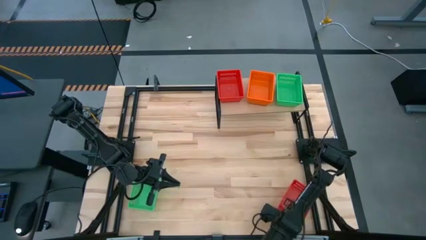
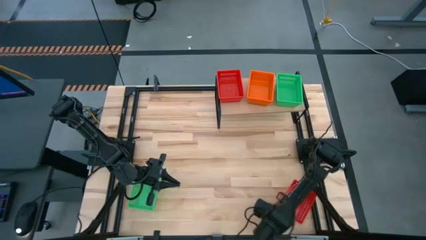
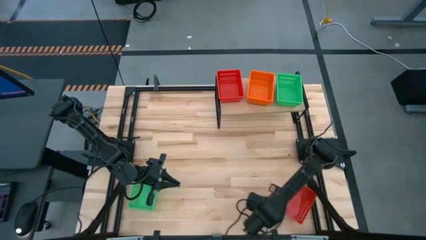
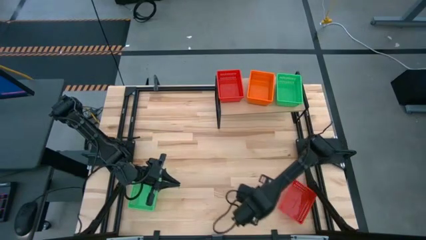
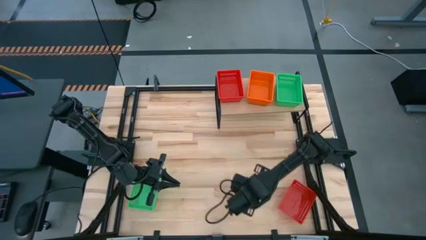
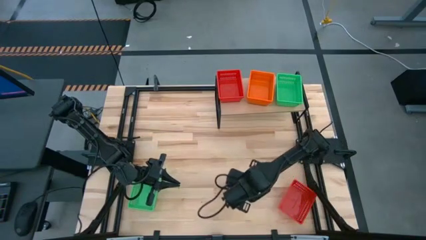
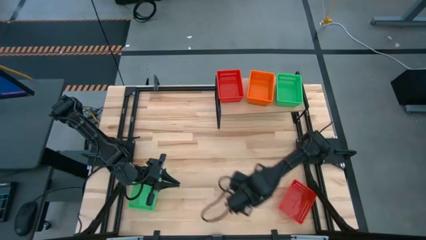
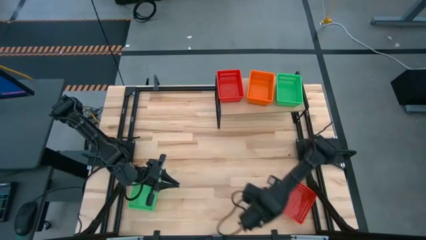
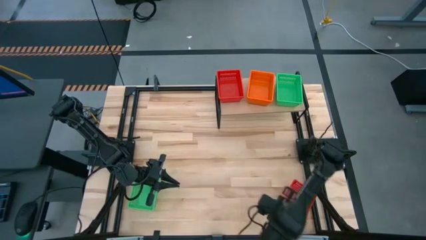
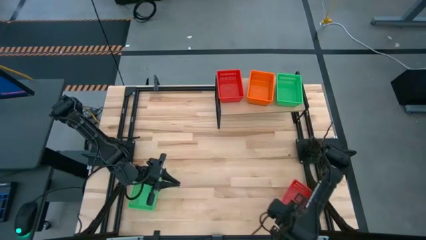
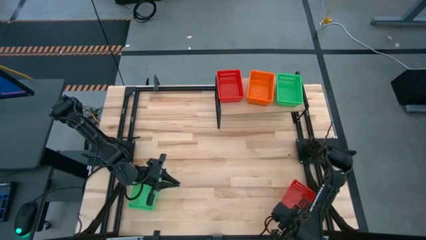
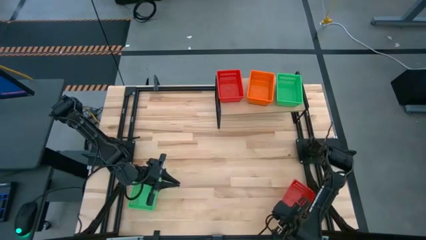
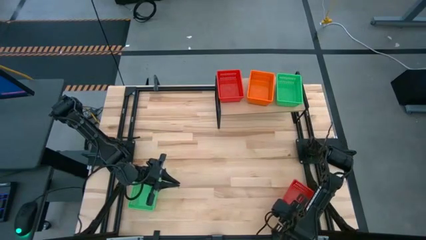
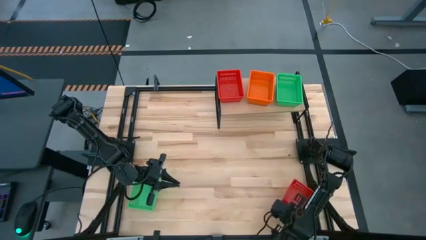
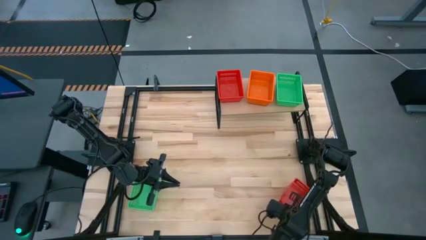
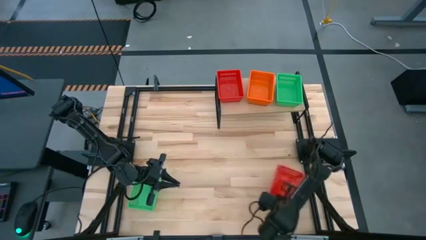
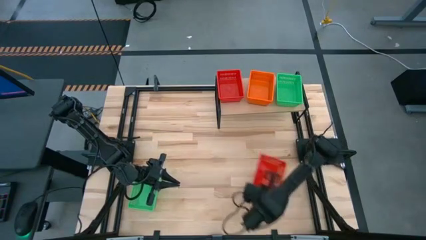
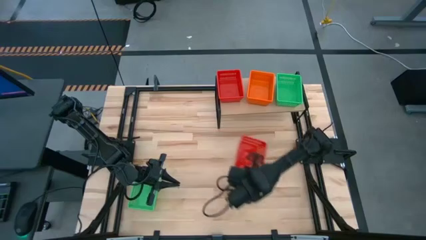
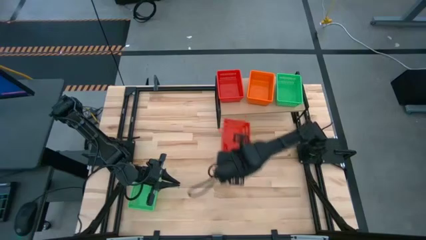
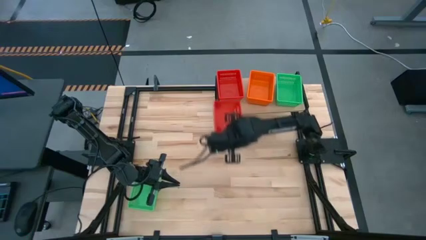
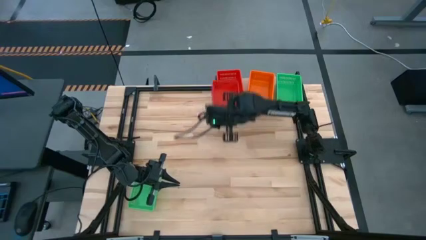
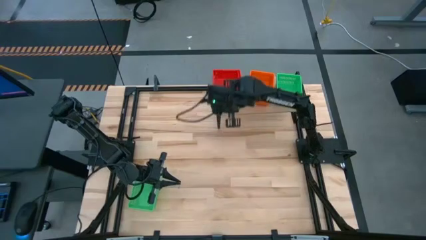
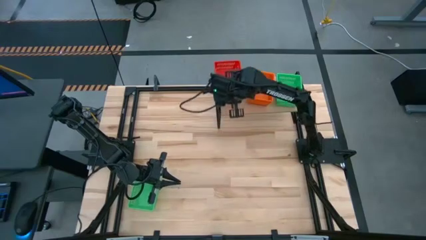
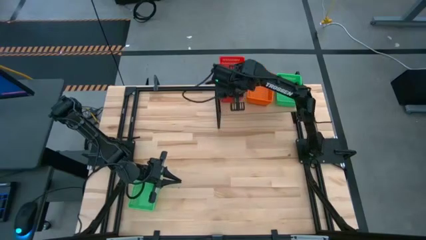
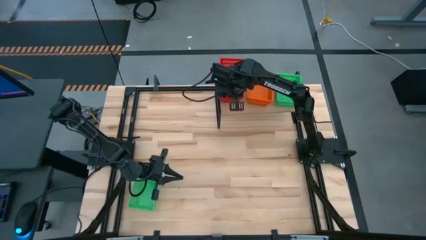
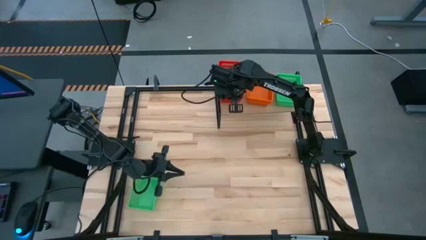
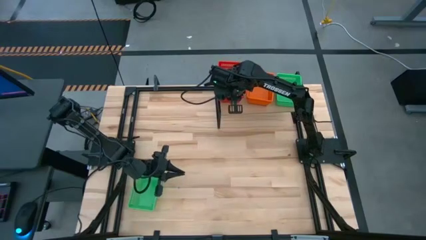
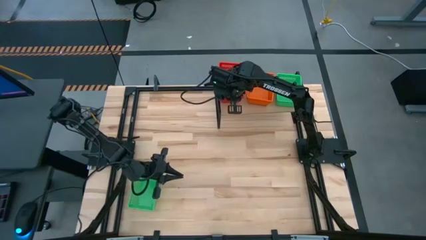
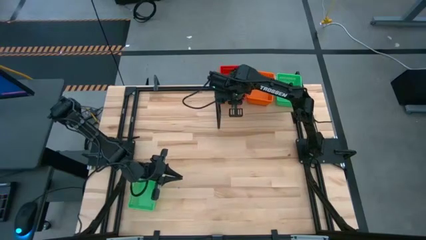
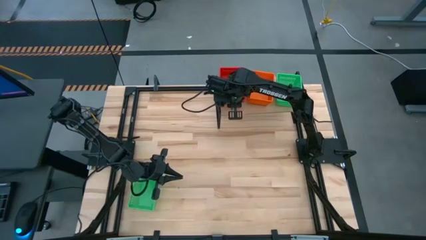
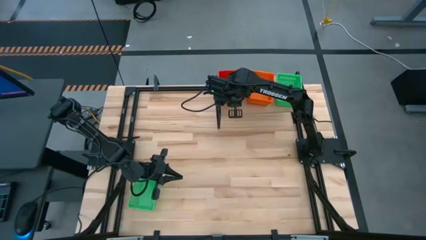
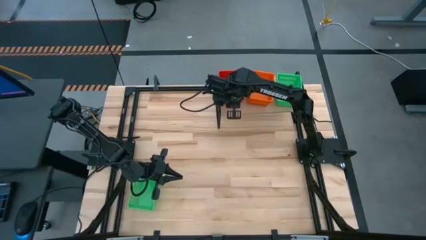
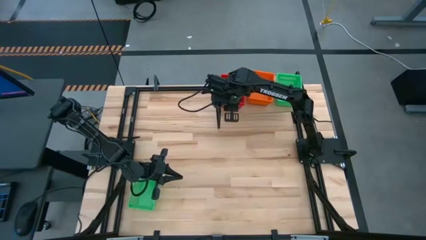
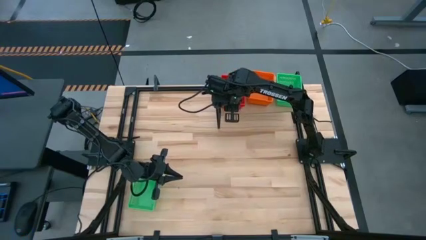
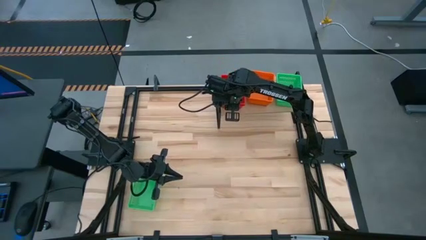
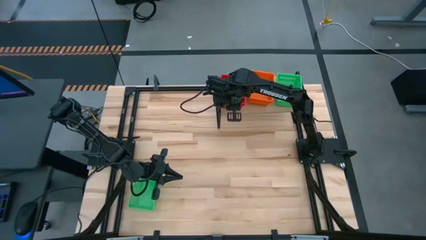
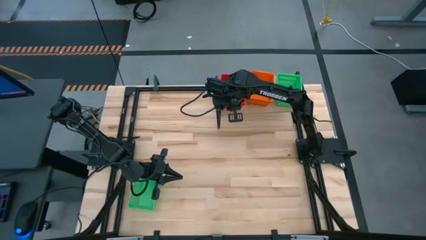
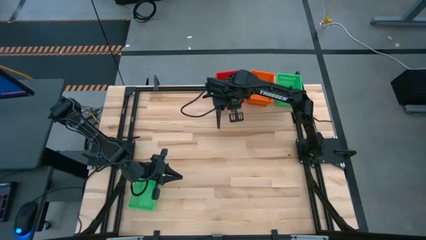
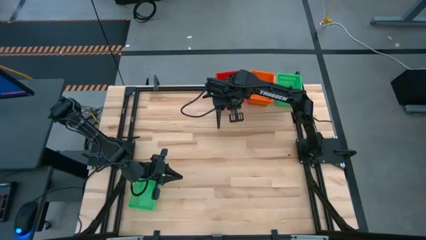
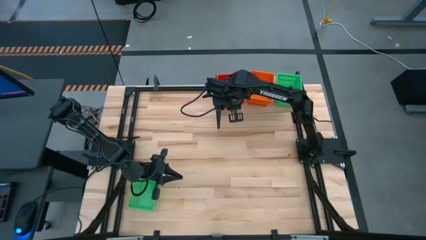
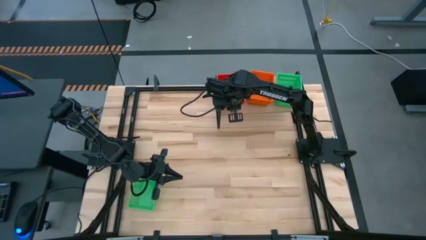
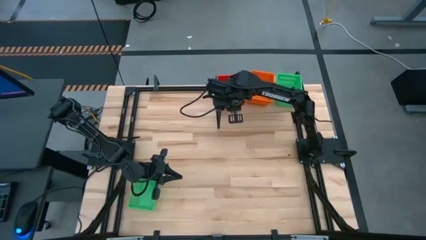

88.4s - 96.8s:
Task: Stack baskets on shelf by color
Stack the red bin on top of the red bin on the shelf

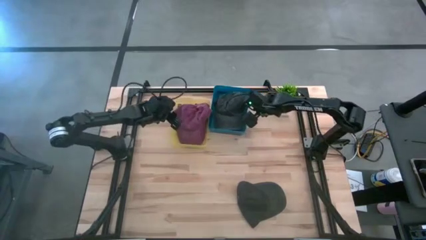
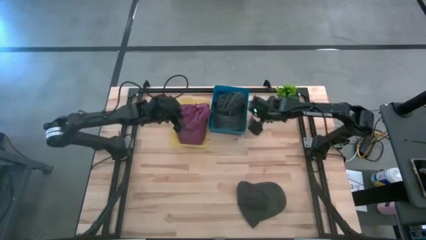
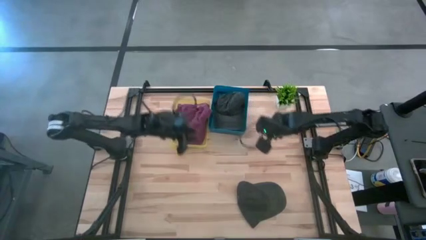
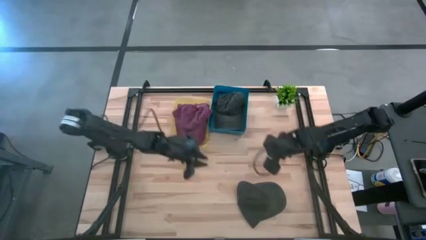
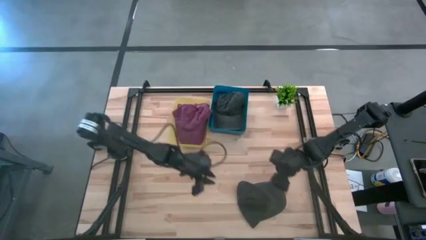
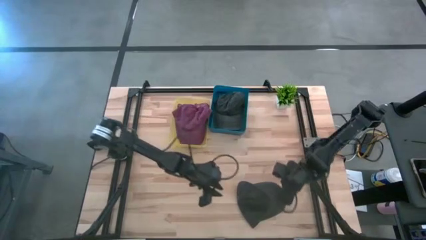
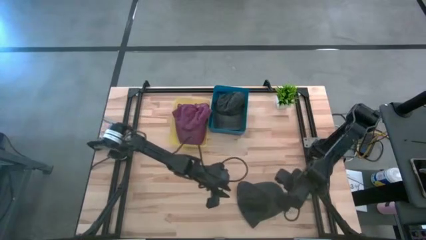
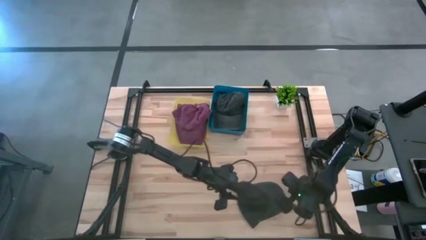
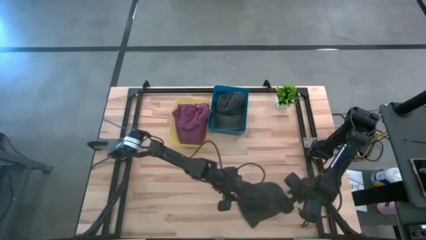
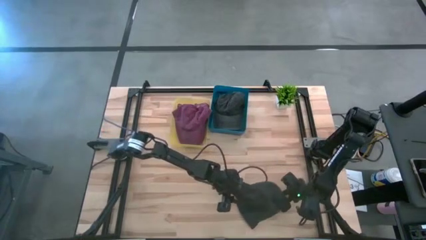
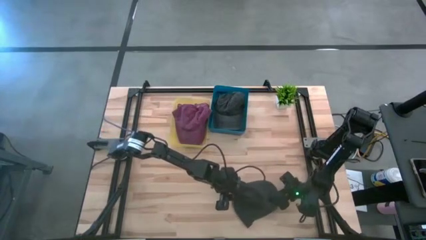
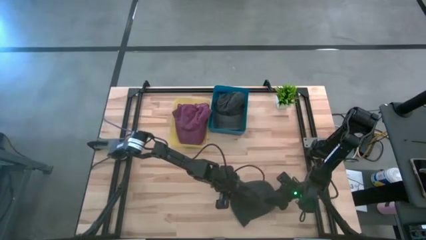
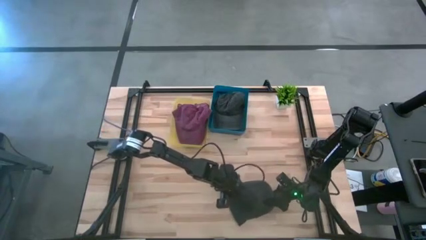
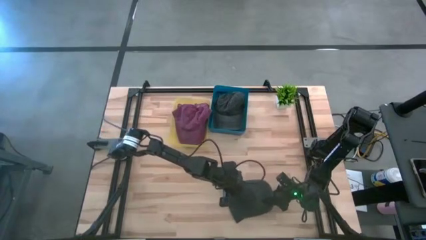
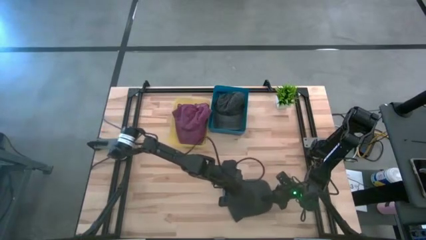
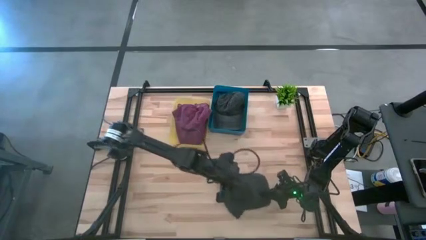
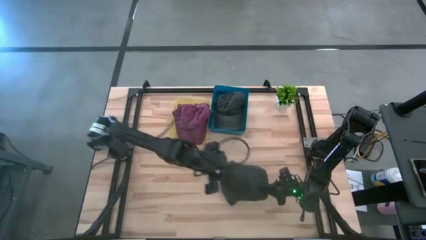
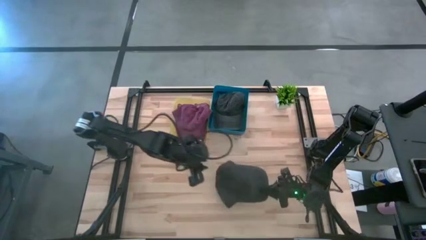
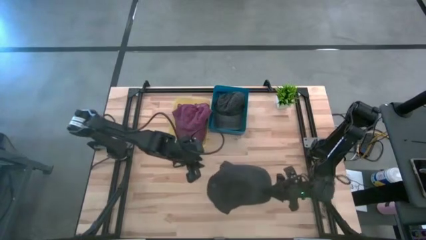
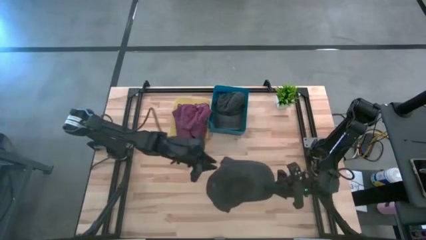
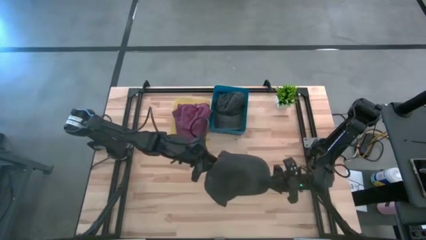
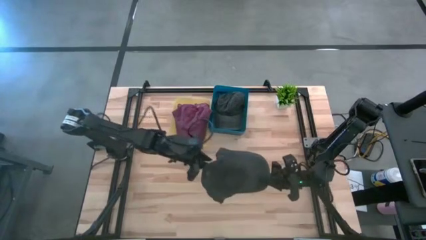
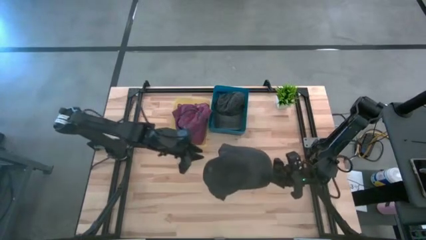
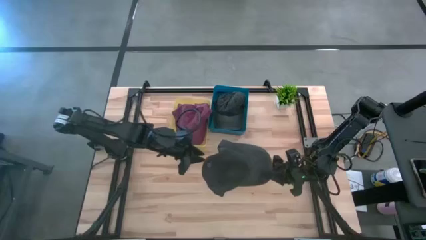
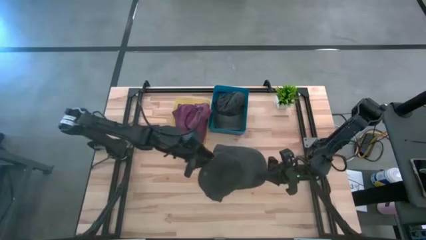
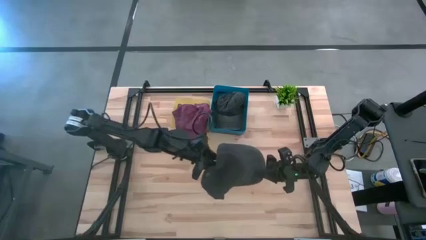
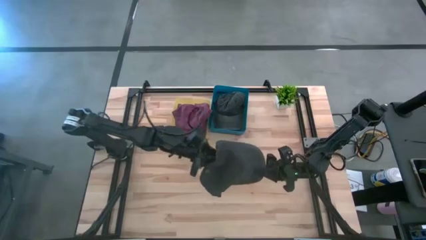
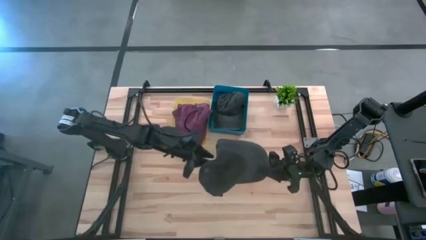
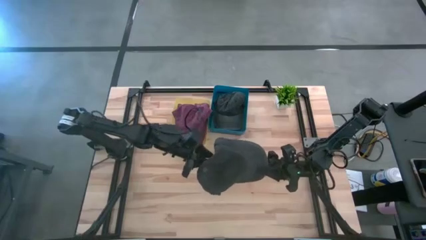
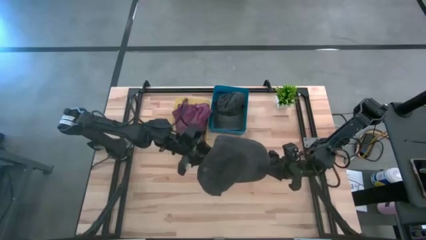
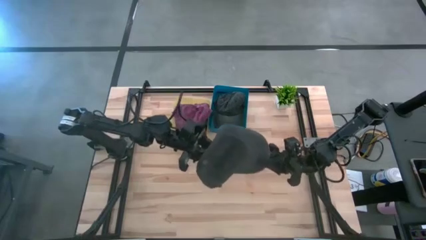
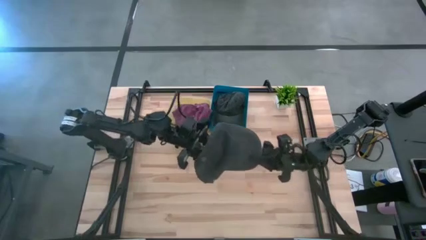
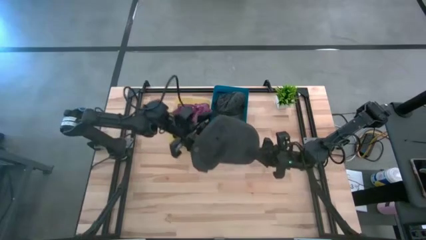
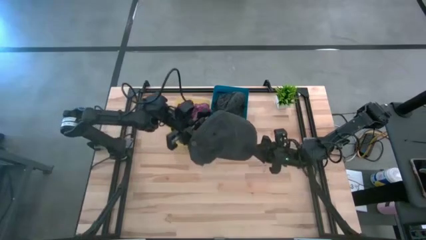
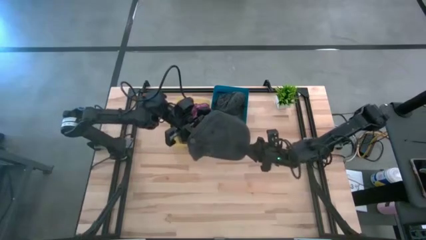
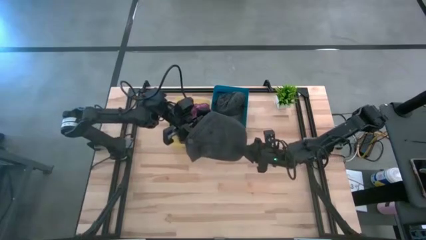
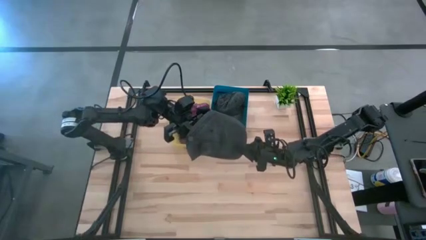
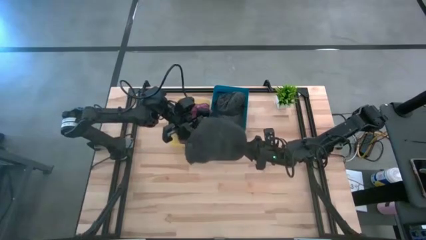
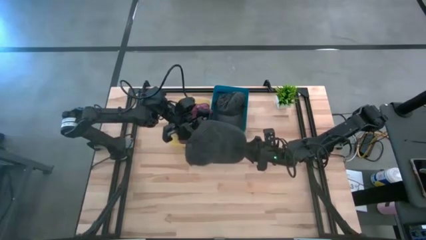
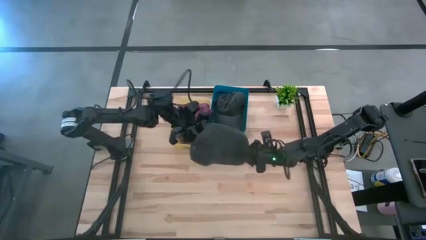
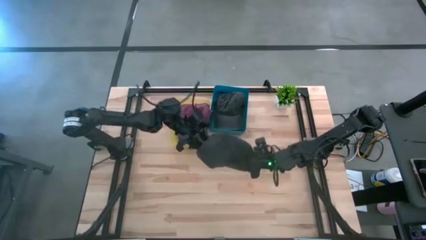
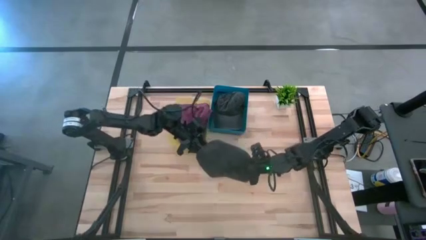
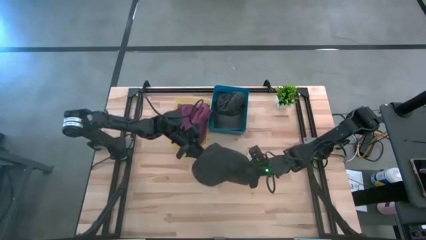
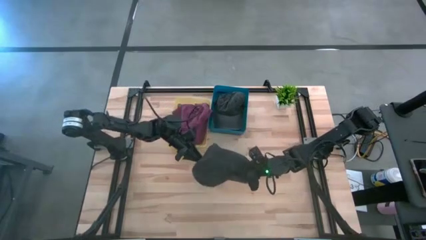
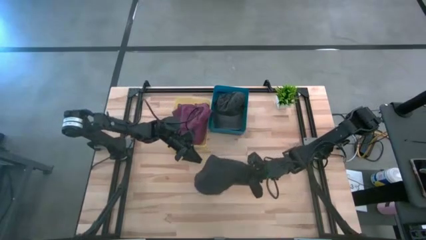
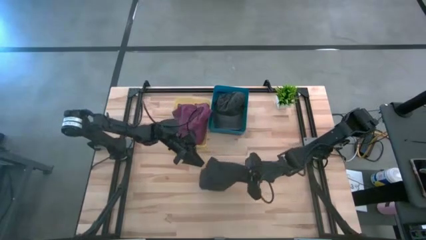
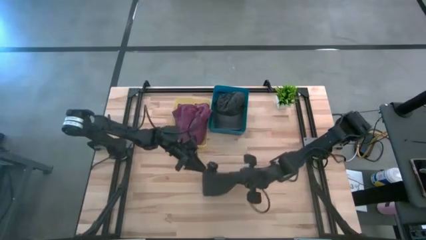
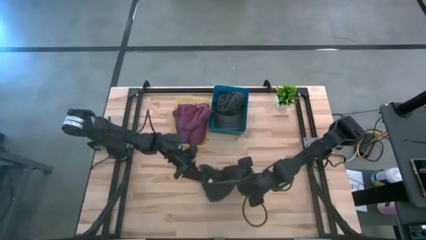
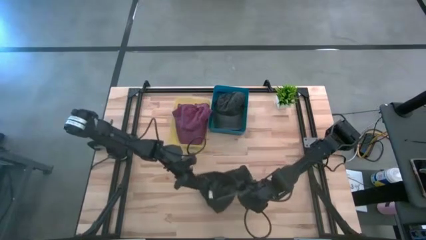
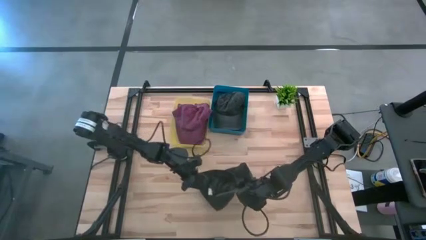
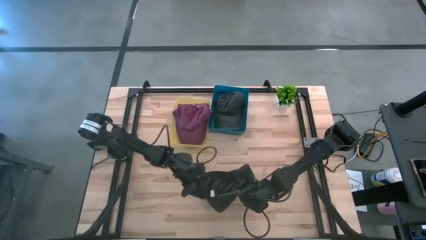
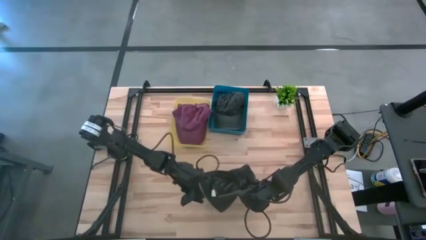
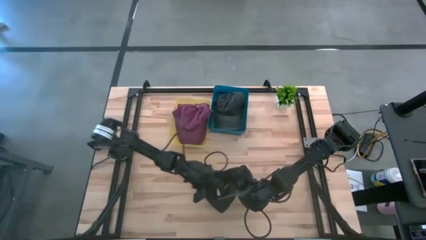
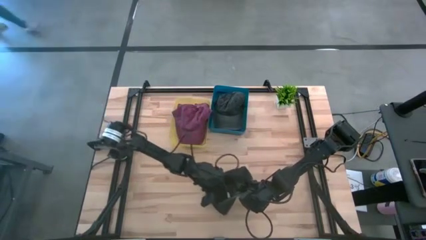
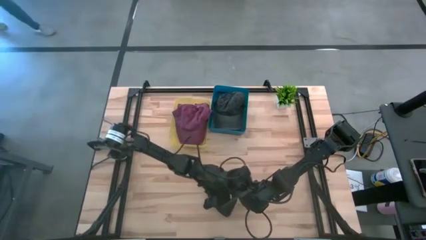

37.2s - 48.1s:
Task: Pick & Place hat
Put the gray cap into the blue bin
